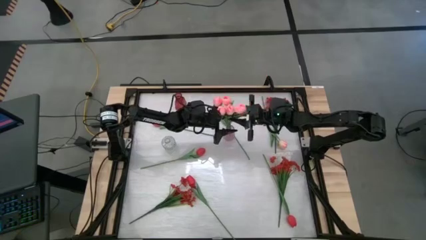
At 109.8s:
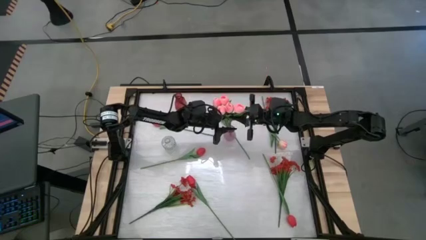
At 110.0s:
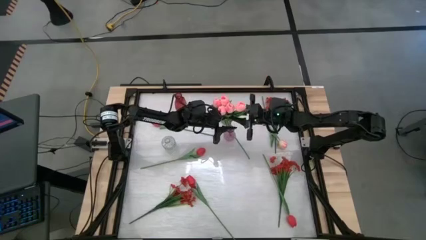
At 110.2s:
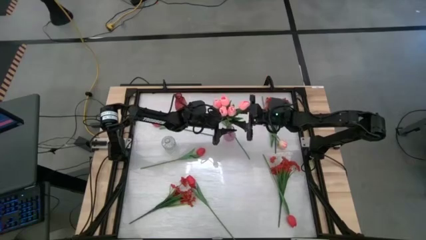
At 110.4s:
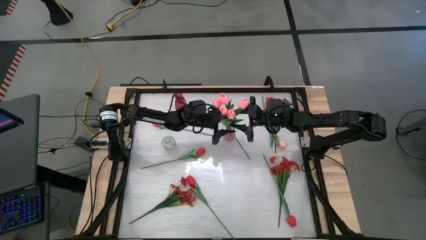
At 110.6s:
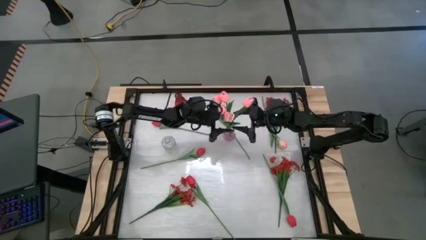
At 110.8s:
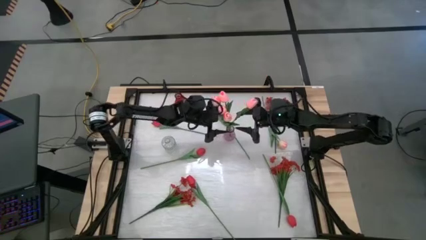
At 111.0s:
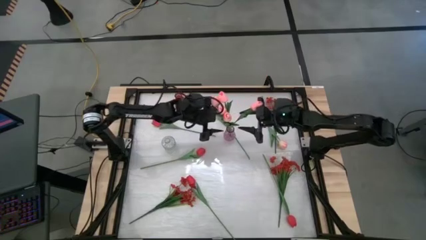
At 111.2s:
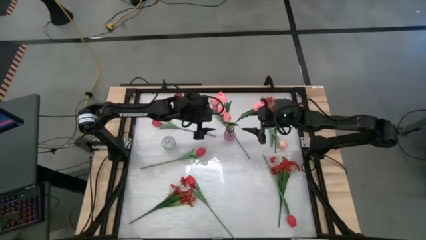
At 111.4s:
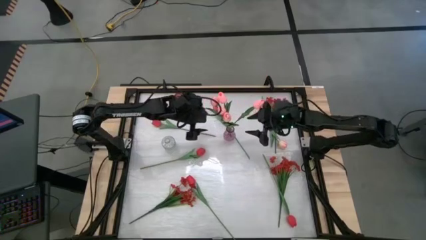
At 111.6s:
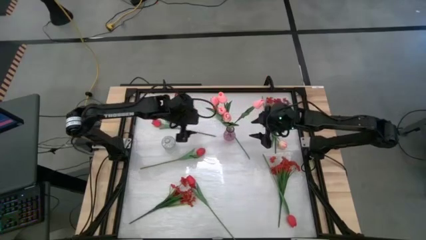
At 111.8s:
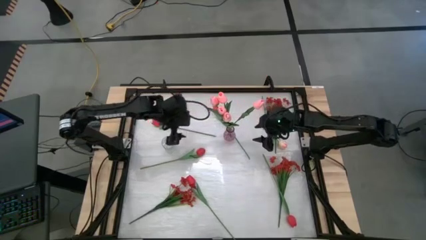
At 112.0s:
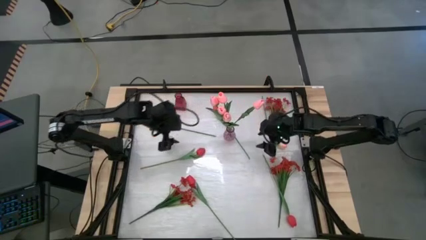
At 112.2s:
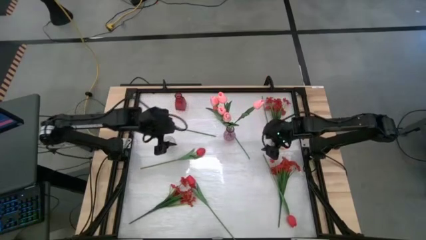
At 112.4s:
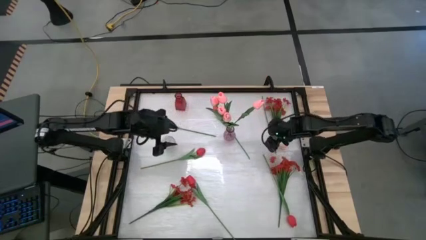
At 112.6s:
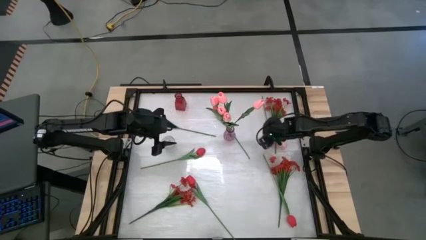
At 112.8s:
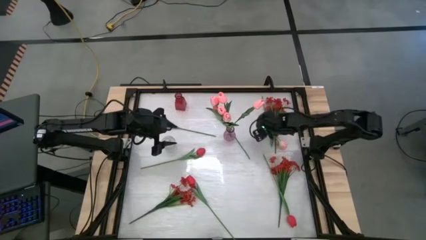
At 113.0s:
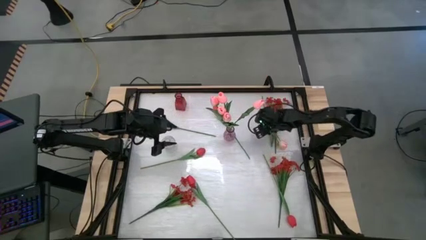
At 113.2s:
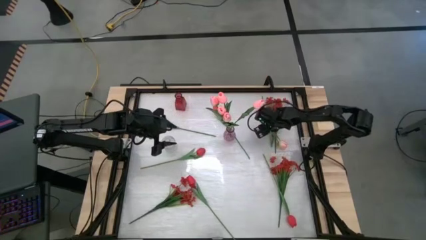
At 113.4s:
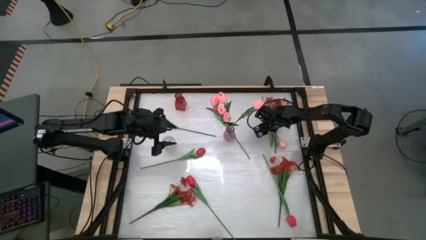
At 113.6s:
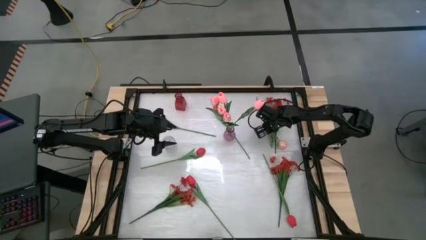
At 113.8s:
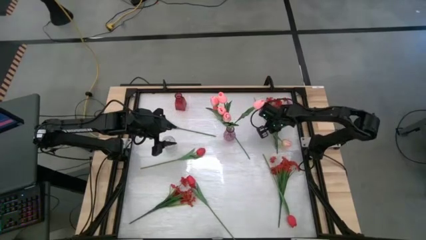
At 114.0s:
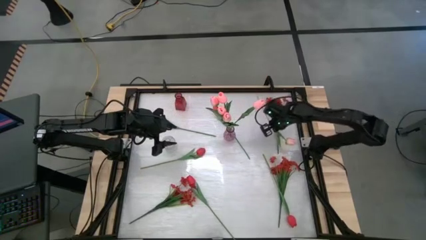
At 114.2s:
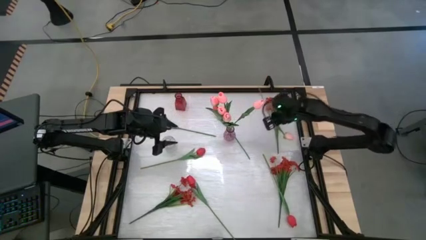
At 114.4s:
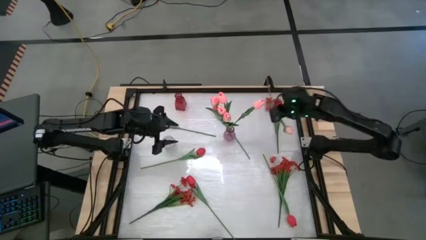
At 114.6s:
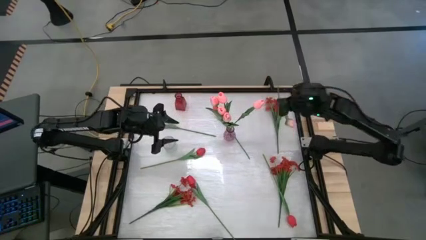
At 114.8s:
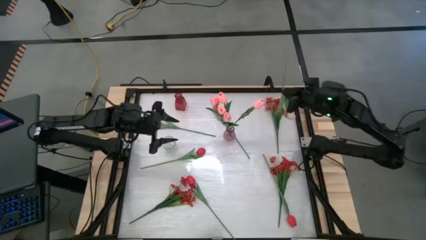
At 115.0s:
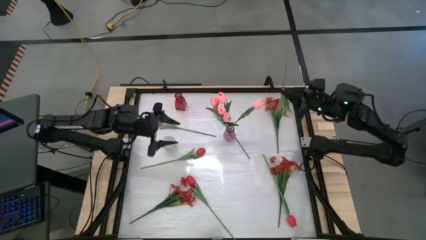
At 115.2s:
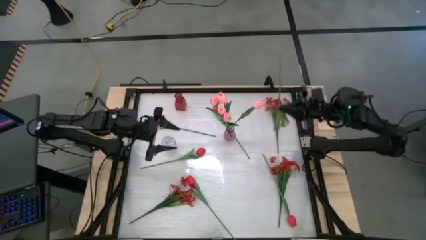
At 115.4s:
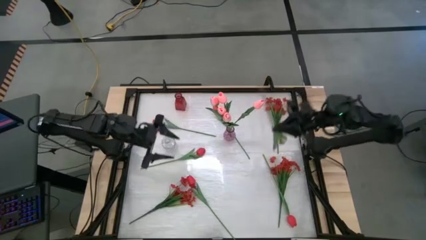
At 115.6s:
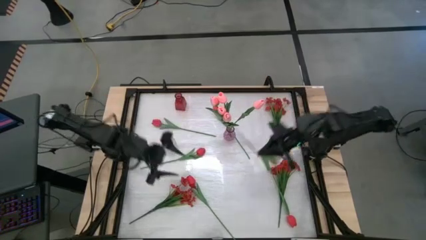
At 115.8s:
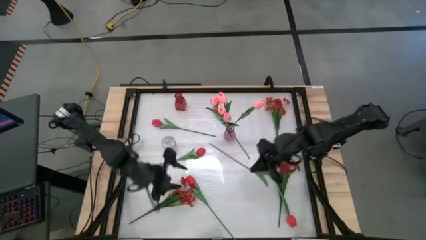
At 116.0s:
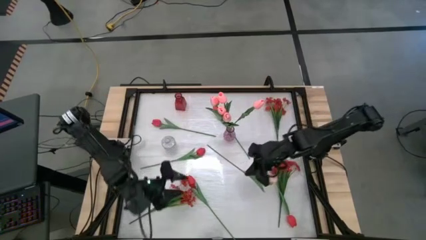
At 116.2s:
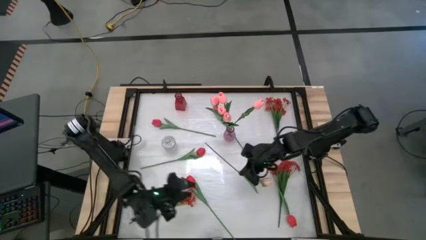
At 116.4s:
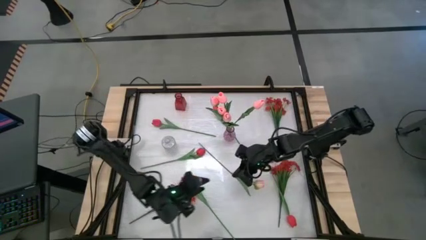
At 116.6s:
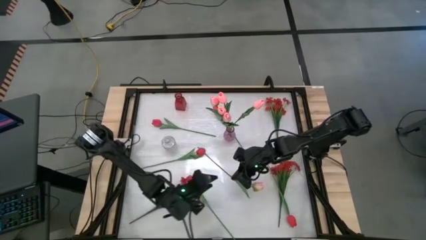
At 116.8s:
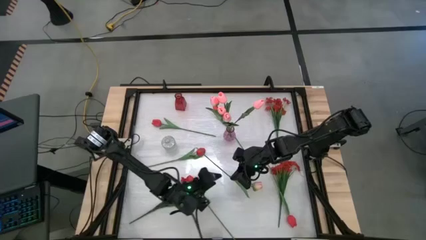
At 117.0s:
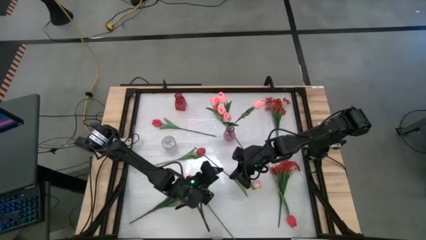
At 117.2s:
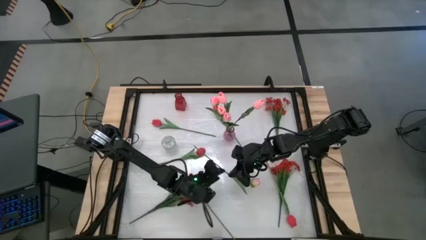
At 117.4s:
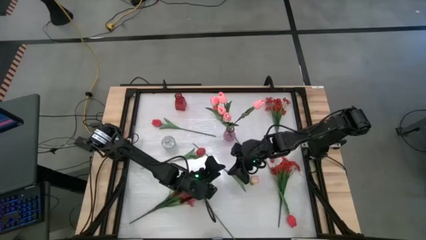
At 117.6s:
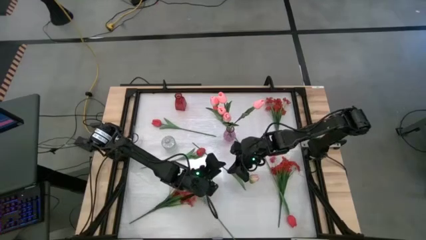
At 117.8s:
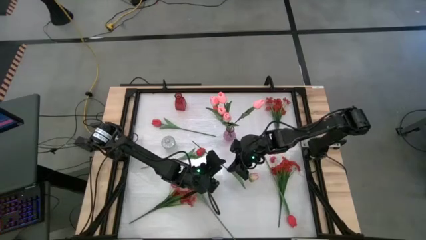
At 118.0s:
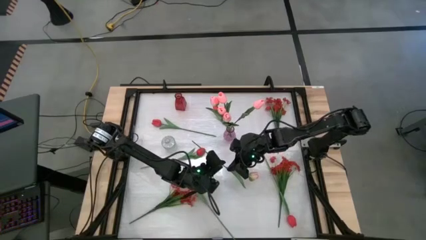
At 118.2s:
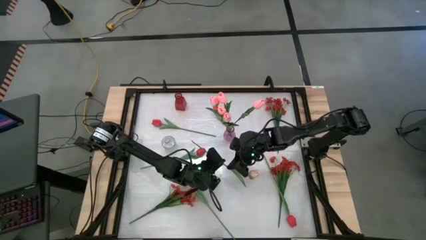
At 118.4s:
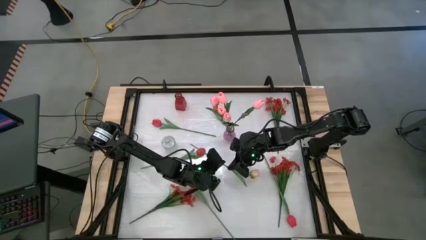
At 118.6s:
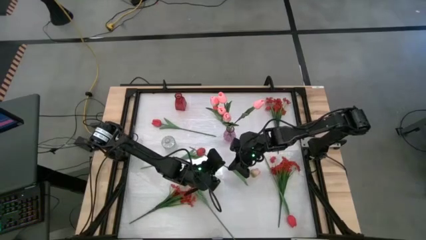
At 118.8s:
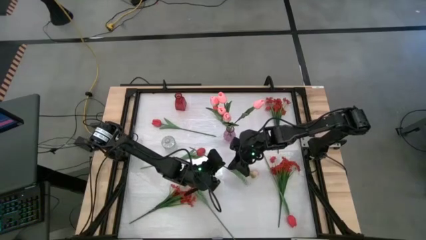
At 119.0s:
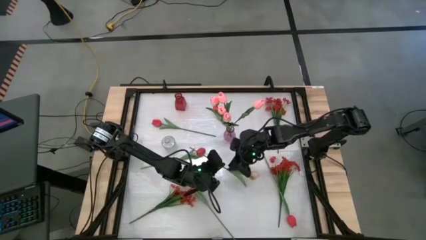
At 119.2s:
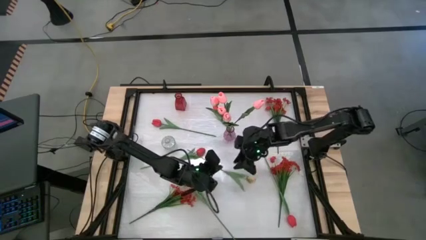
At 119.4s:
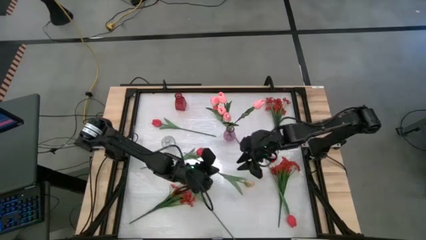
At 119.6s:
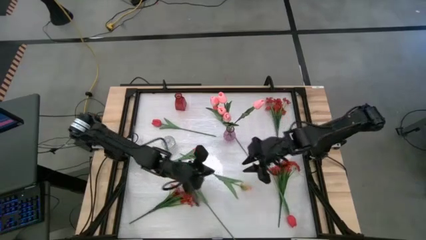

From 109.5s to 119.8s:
Task: Sort flowers into vase by color
Put the pink tulip into the purple vase

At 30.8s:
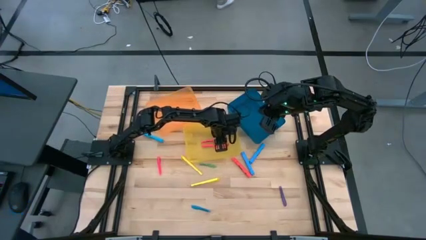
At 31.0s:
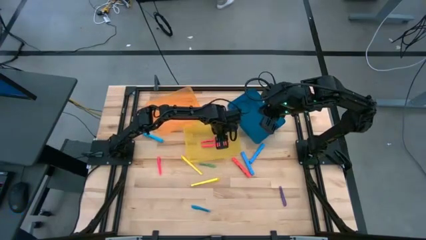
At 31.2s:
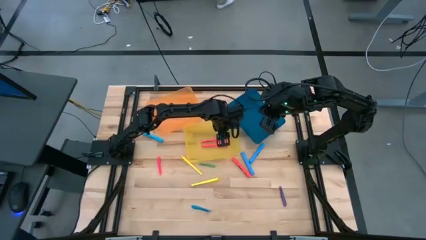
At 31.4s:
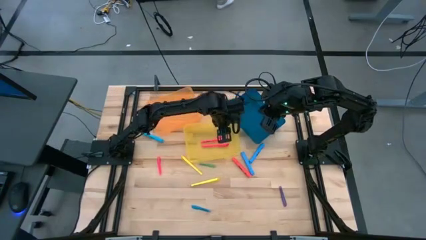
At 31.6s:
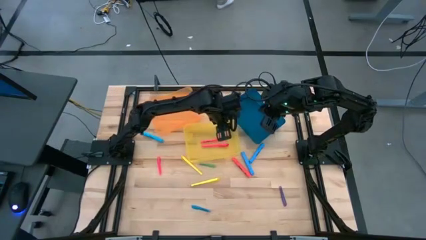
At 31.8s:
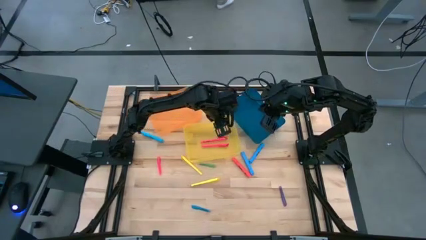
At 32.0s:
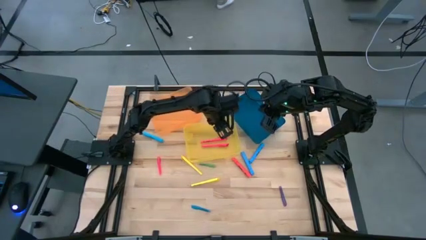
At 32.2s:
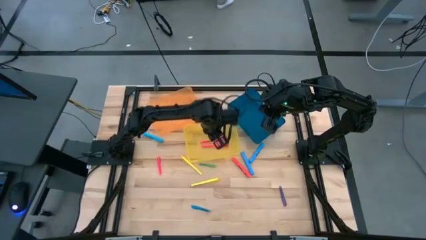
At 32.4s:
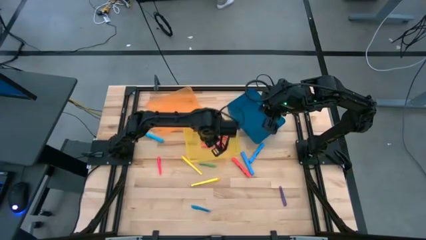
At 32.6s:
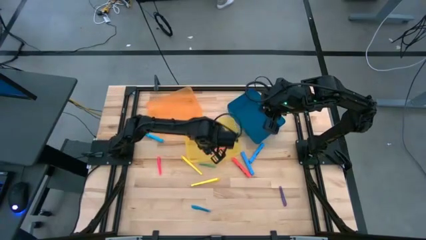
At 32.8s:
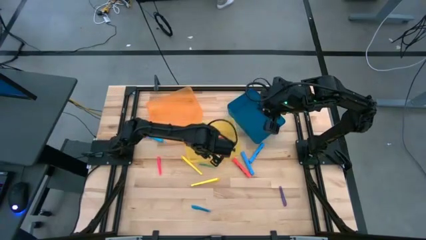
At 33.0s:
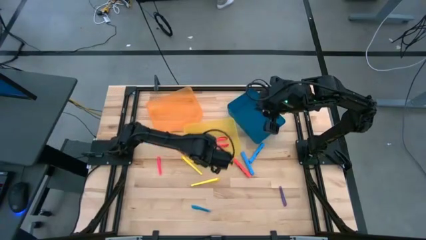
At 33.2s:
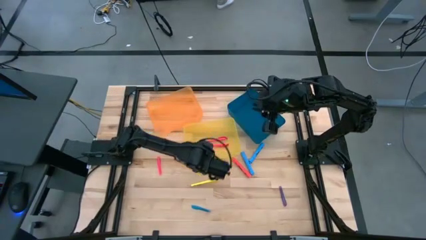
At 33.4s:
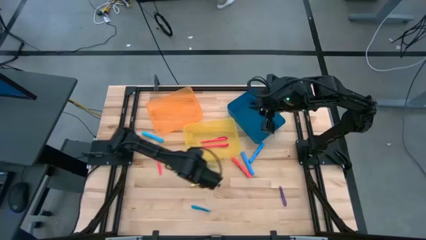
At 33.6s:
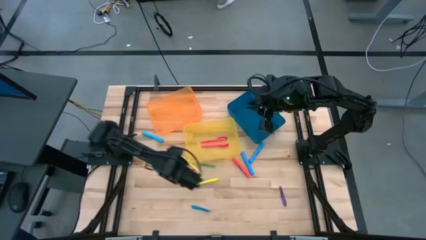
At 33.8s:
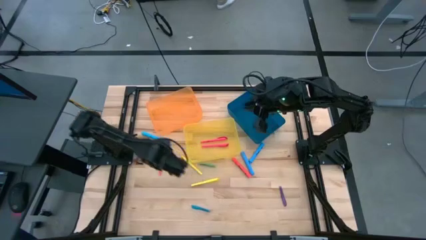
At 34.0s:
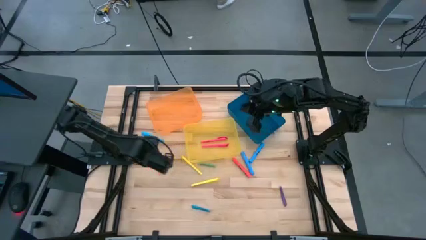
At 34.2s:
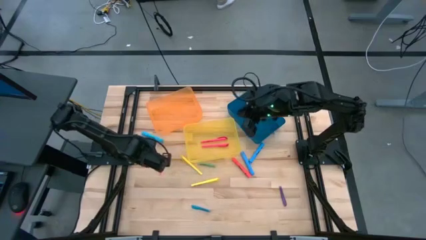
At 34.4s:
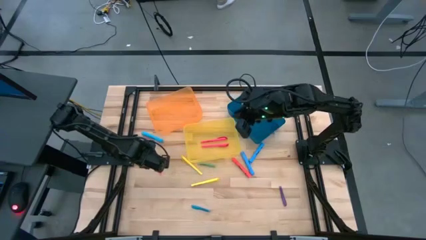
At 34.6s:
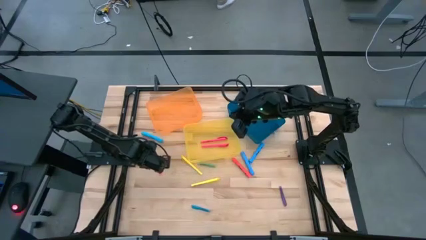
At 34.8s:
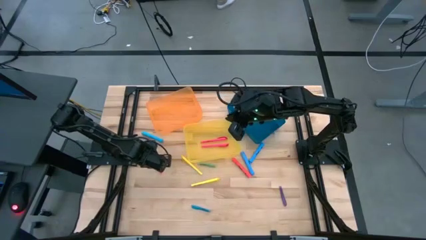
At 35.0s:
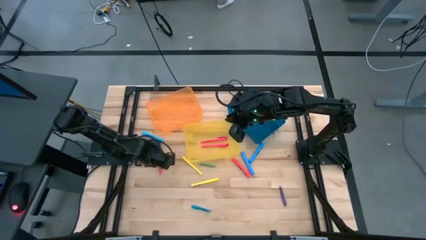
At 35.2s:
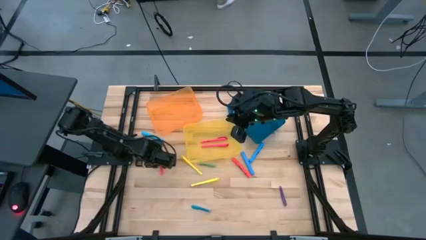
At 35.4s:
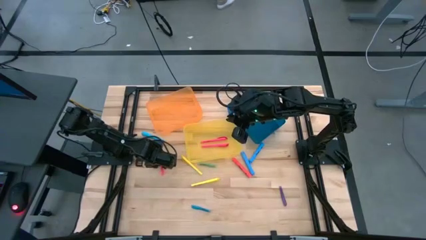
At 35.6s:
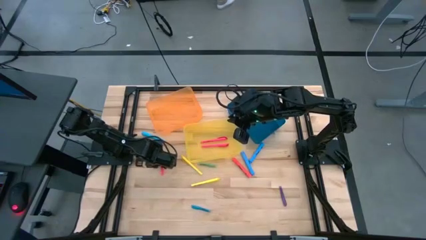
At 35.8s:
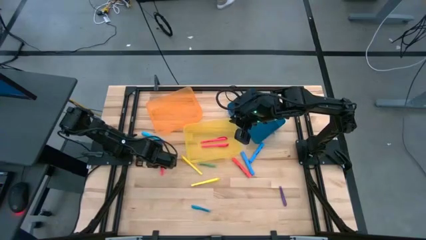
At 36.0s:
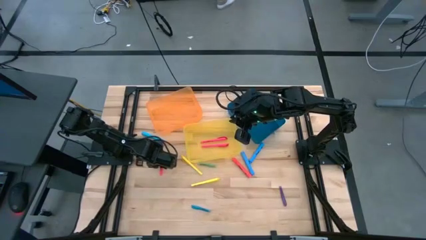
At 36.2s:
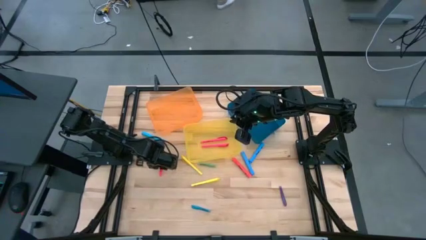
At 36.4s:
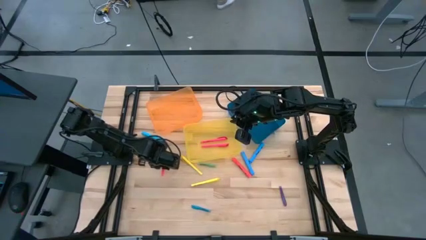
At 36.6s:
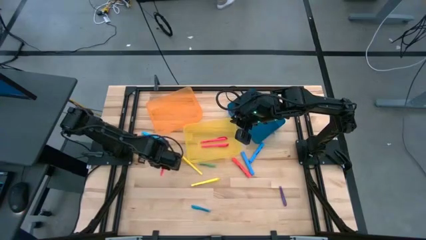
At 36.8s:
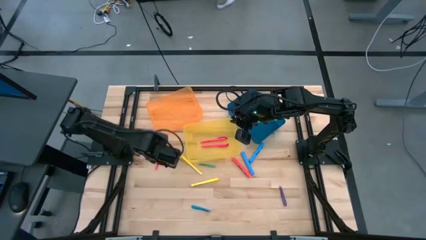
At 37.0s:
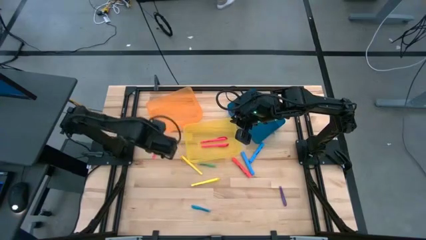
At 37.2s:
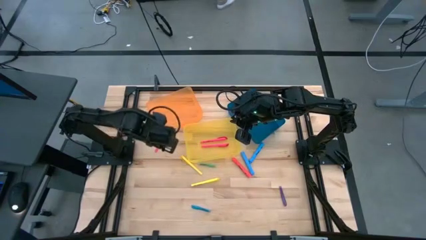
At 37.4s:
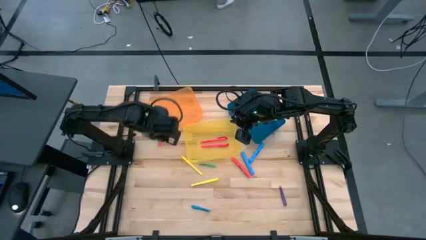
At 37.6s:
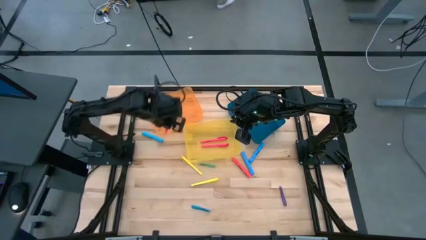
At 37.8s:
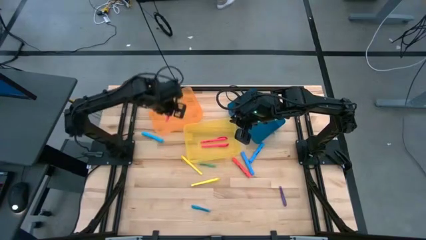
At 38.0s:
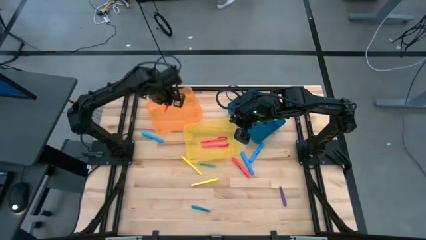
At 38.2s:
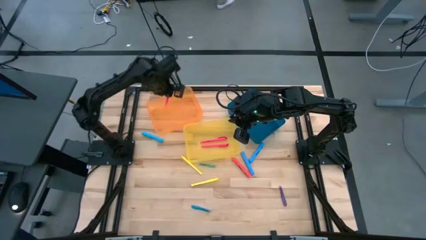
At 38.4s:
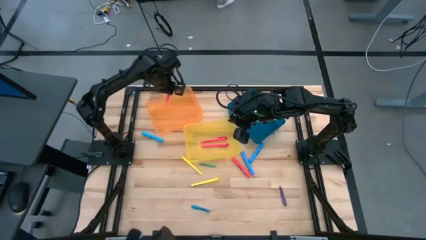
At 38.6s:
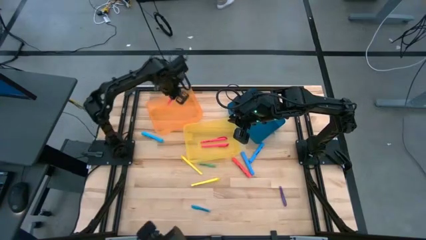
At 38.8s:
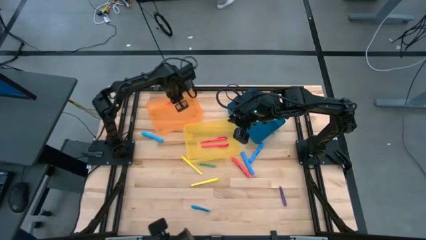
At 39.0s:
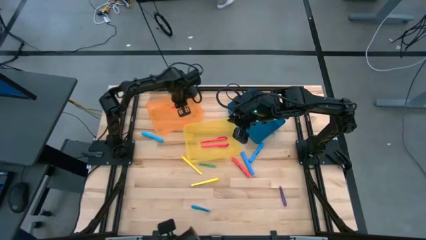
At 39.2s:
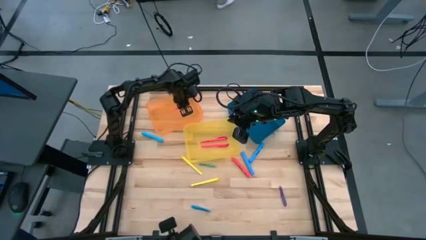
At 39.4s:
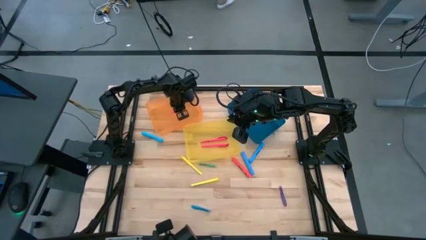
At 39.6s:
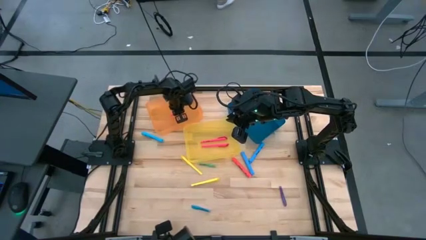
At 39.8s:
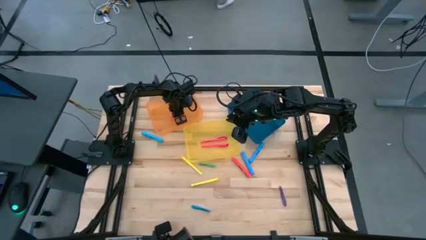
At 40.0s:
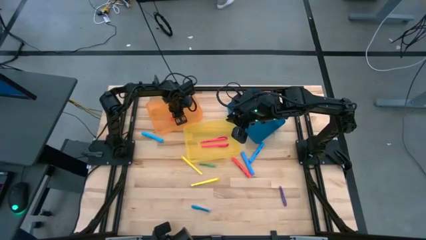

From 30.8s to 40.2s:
Task: Pick & Place Markers
Put the pink pen into the orange bin
